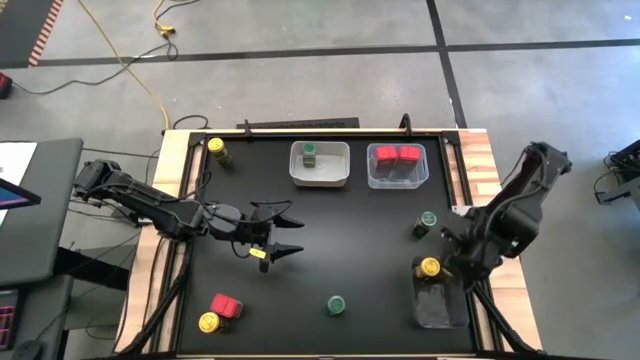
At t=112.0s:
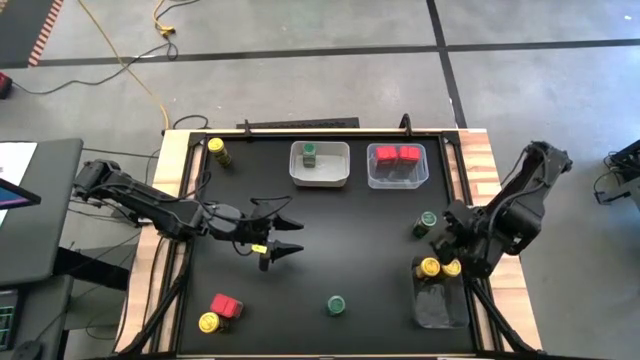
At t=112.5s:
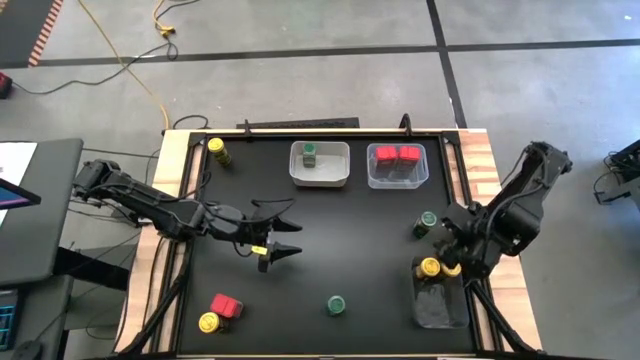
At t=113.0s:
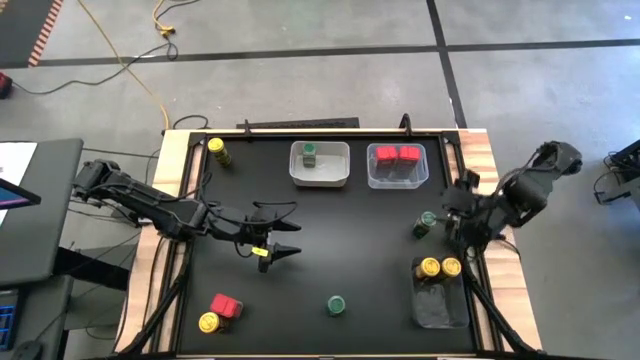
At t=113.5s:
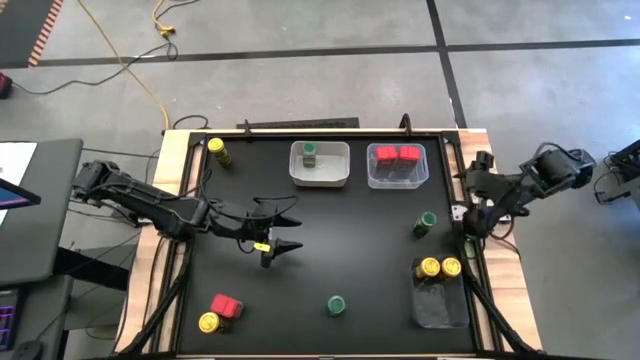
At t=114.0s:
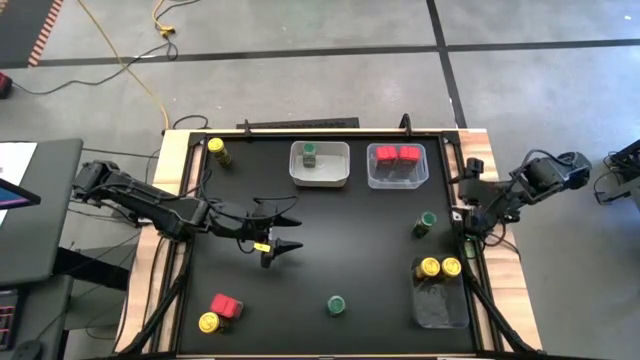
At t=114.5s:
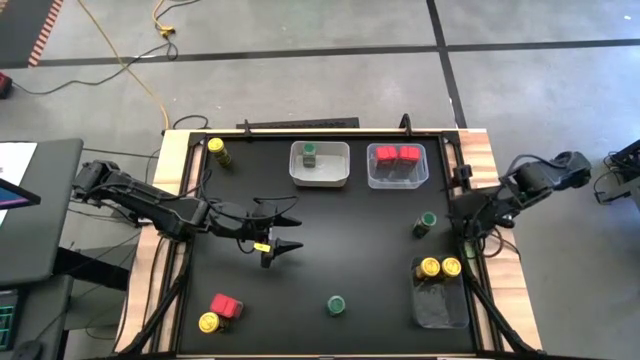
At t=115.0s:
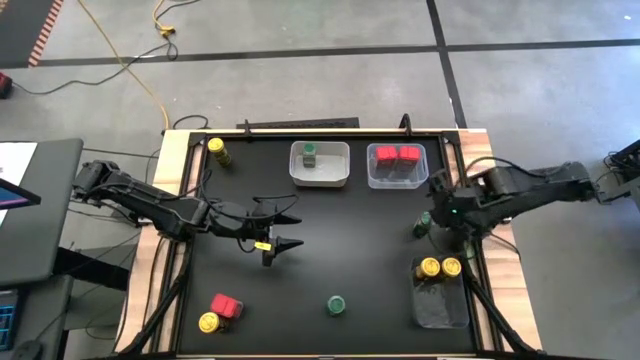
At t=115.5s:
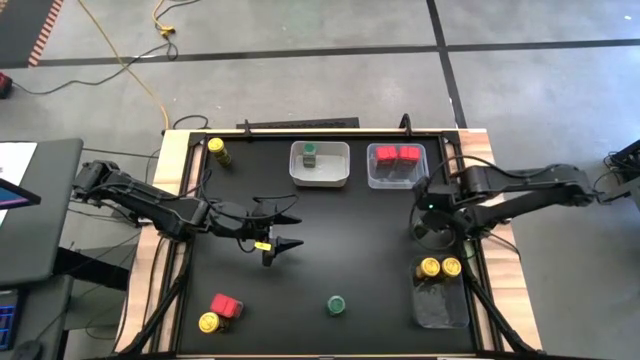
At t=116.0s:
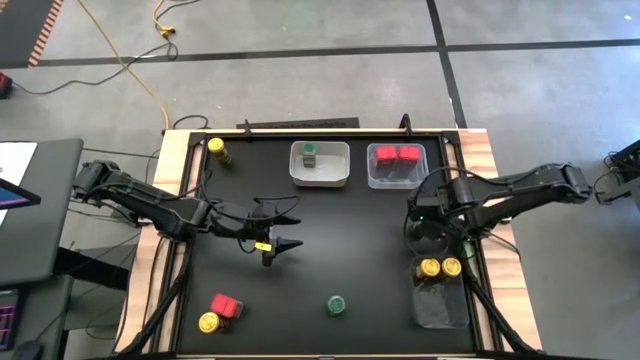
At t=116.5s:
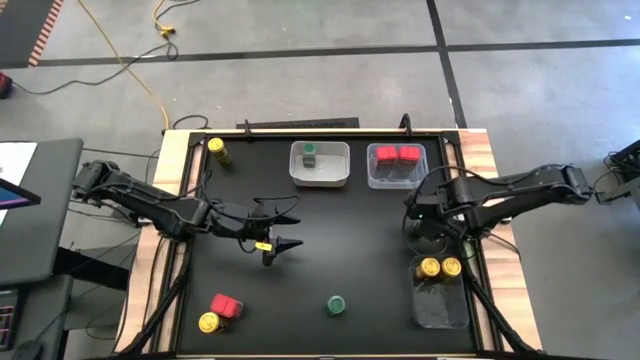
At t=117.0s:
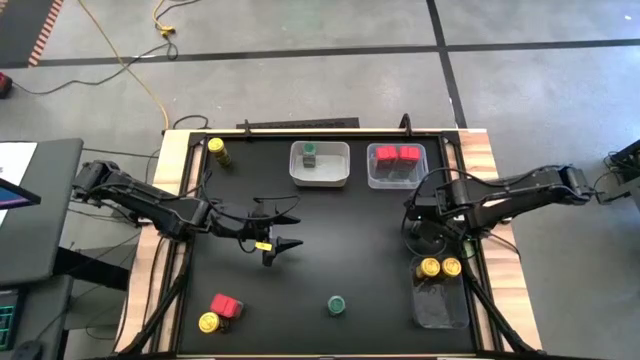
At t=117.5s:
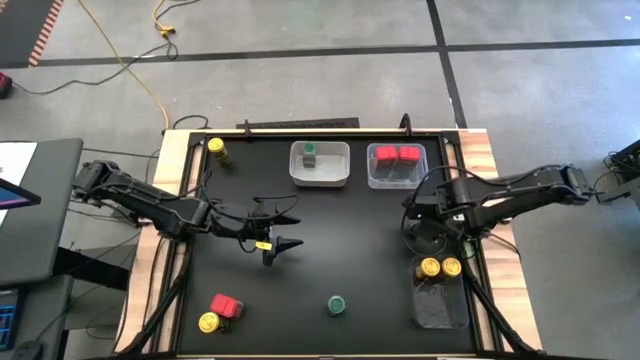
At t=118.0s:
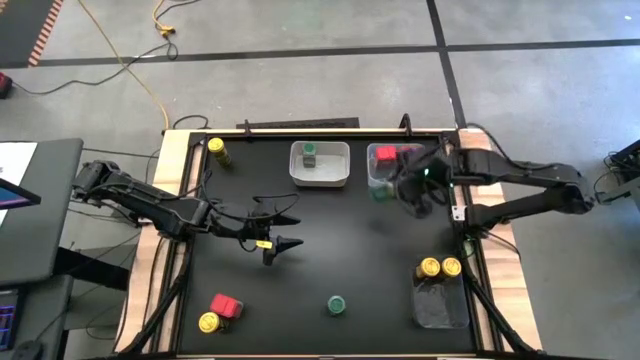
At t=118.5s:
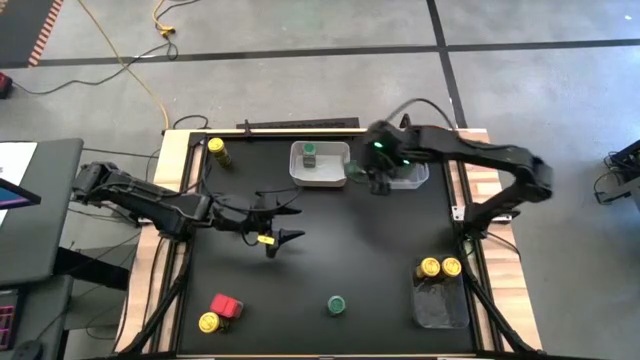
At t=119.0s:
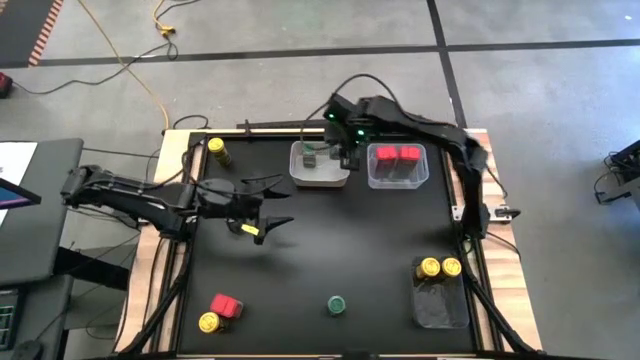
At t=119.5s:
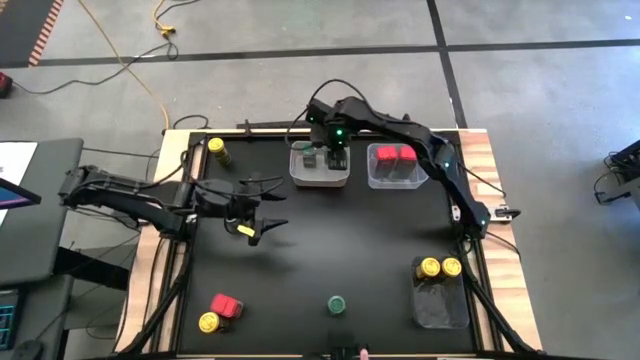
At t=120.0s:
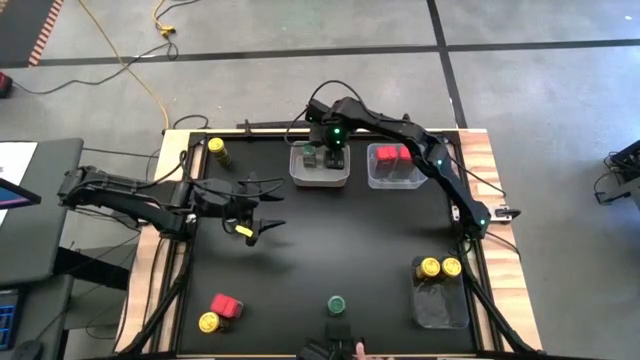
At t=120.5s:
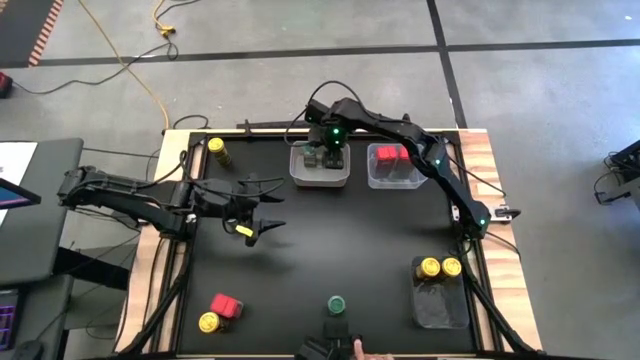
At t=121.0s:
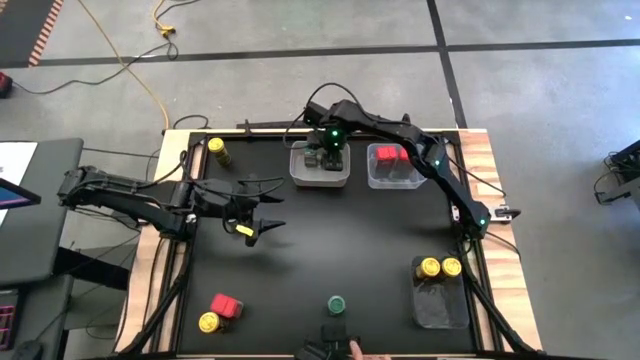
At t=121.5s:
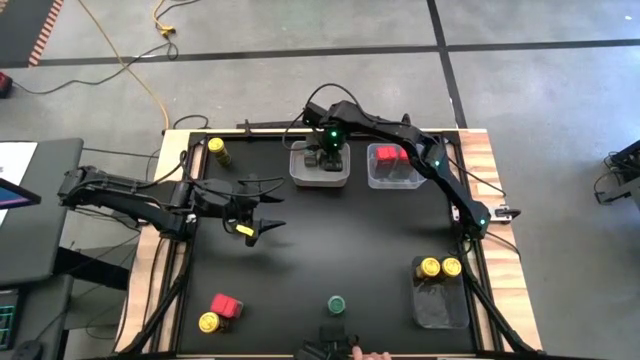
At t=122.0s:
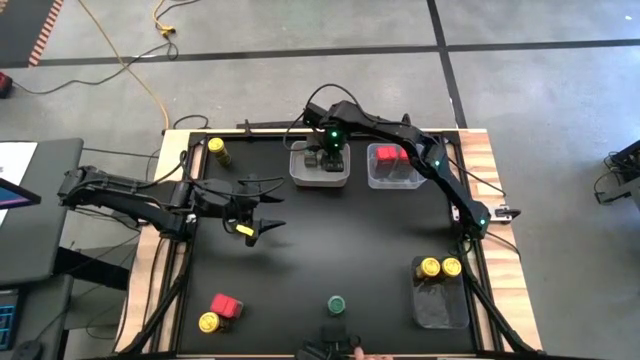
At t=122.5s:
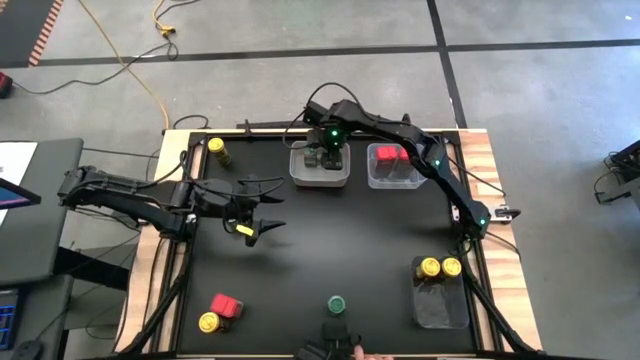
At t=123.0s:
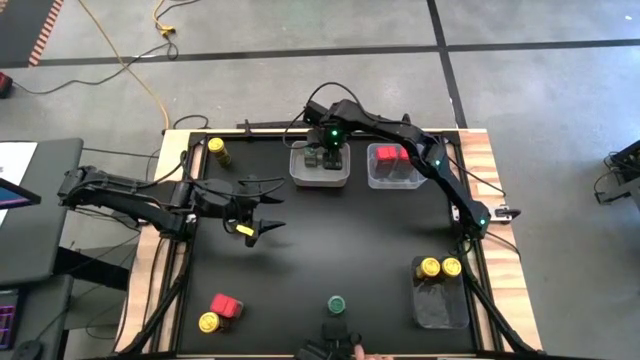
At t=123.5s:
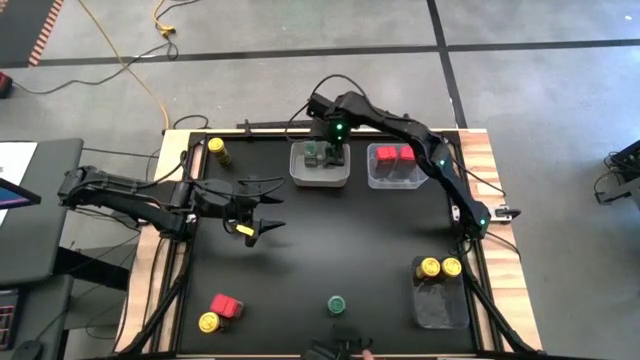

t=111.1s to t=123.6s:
Task: Sort spices by type
Put the right green seasoning bottle into the white bin

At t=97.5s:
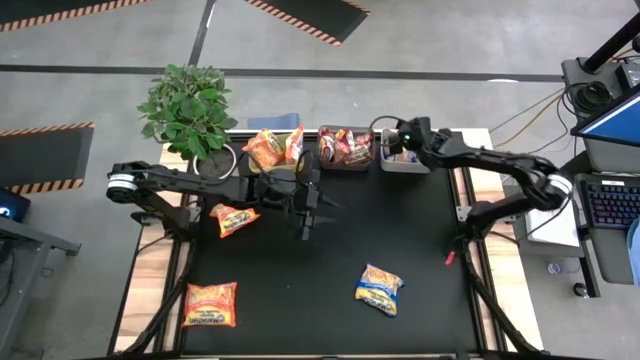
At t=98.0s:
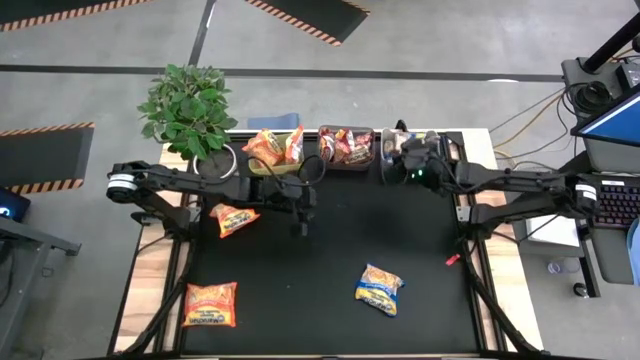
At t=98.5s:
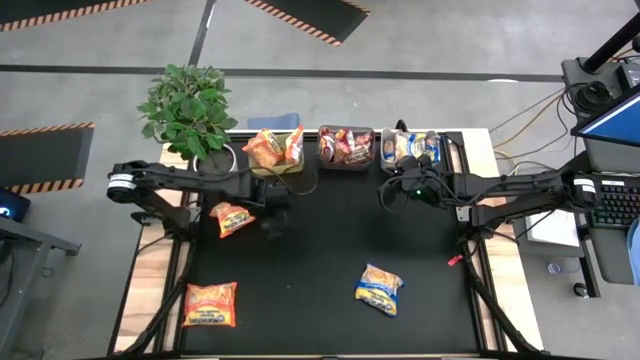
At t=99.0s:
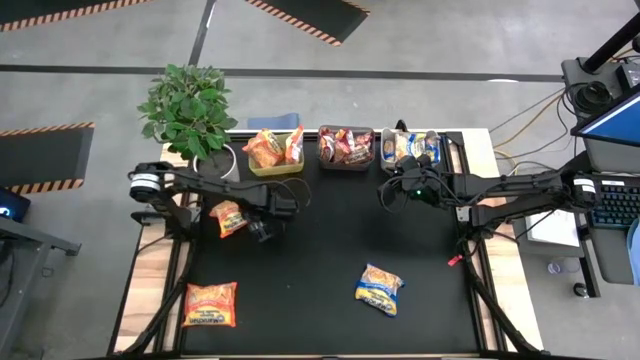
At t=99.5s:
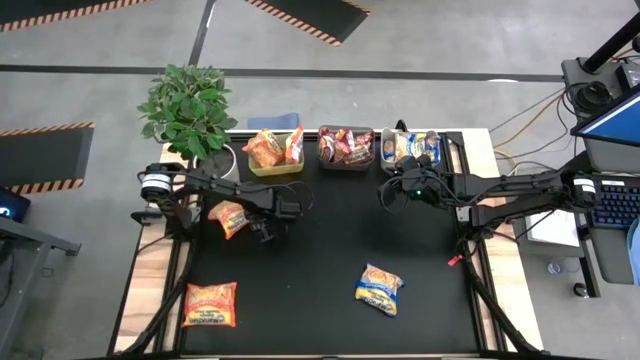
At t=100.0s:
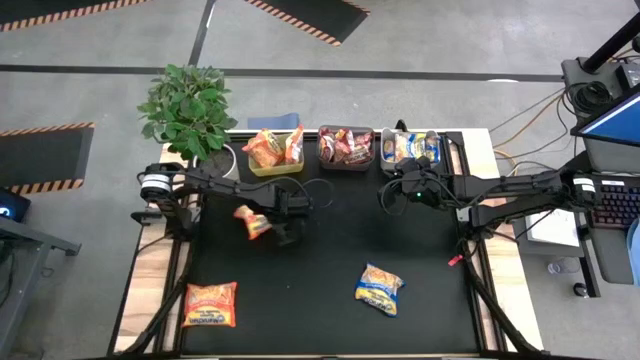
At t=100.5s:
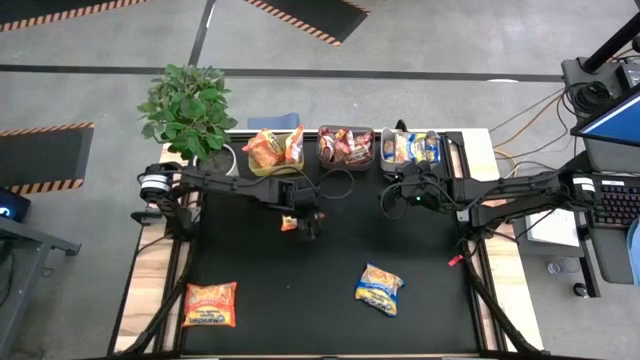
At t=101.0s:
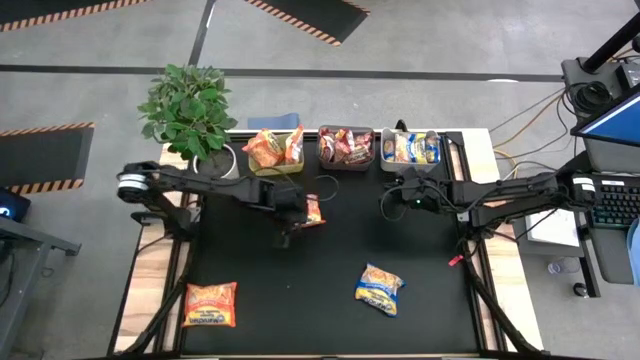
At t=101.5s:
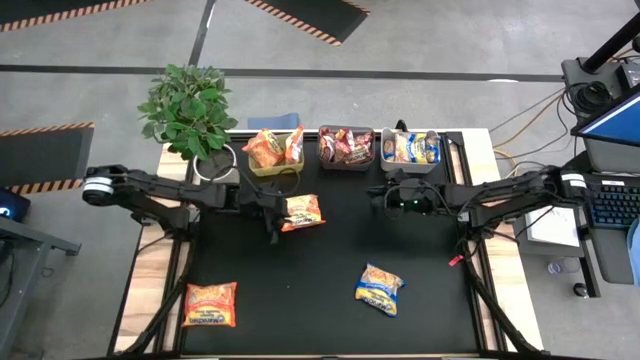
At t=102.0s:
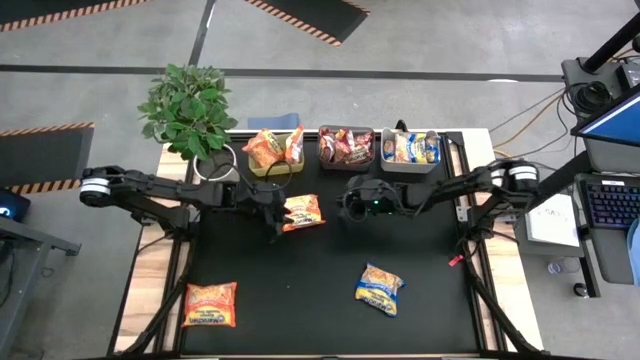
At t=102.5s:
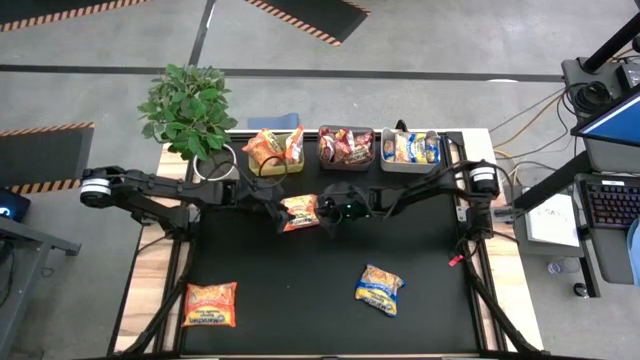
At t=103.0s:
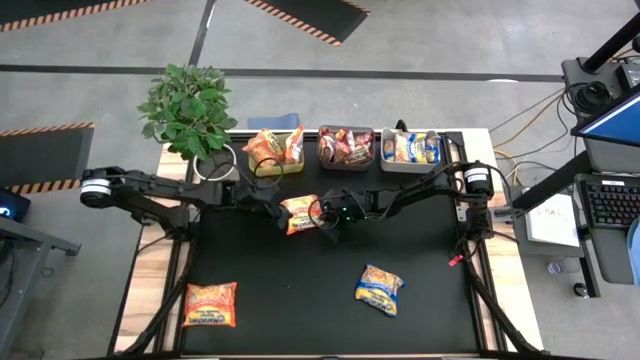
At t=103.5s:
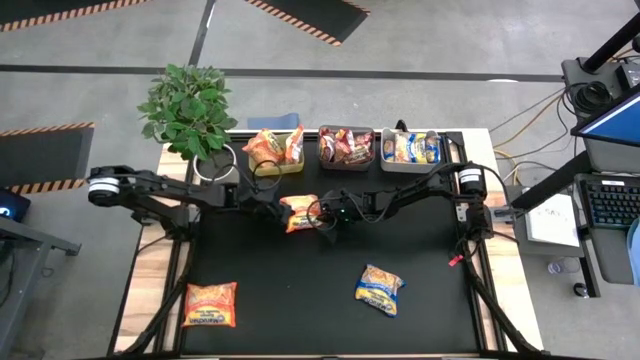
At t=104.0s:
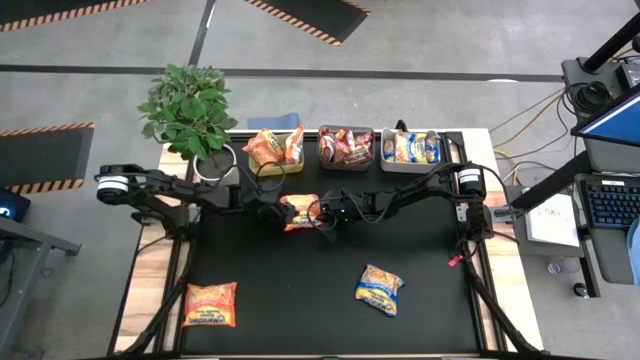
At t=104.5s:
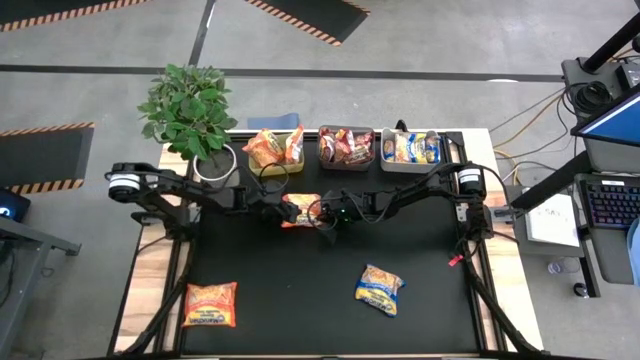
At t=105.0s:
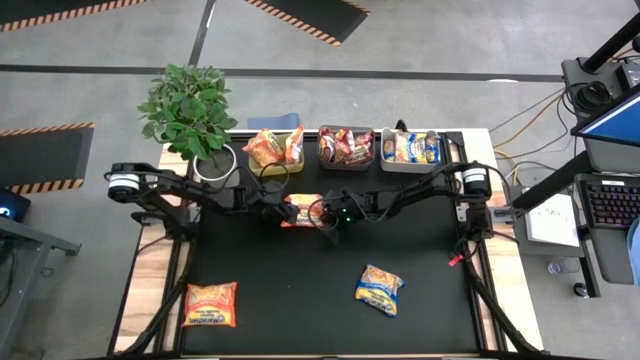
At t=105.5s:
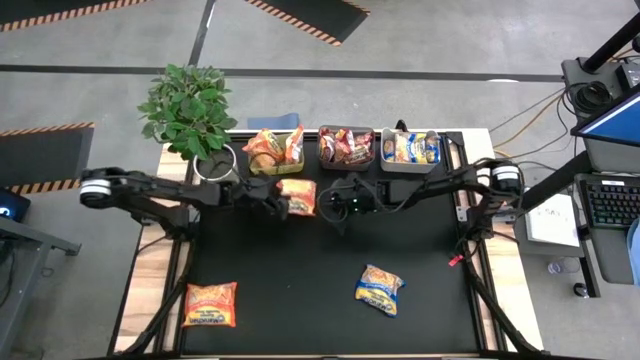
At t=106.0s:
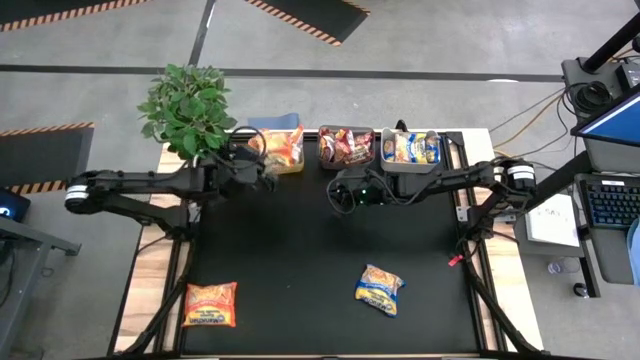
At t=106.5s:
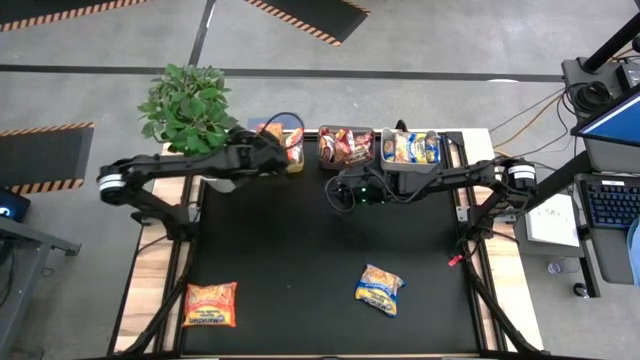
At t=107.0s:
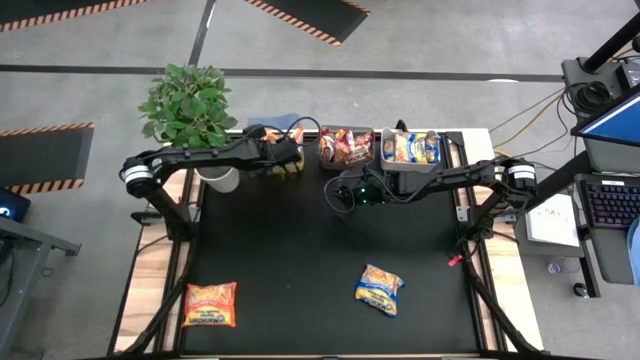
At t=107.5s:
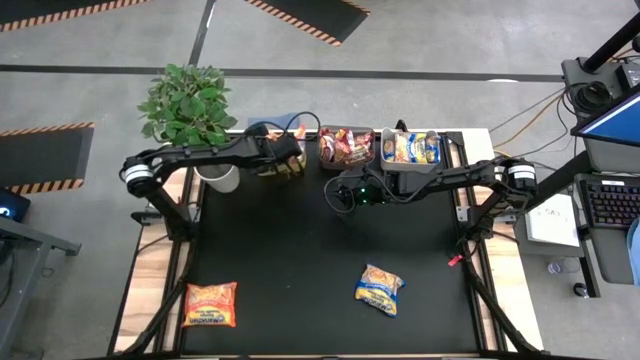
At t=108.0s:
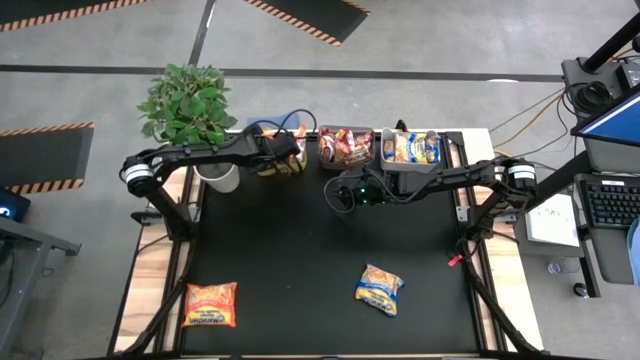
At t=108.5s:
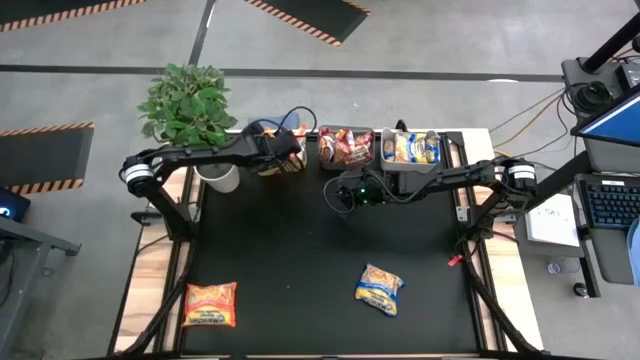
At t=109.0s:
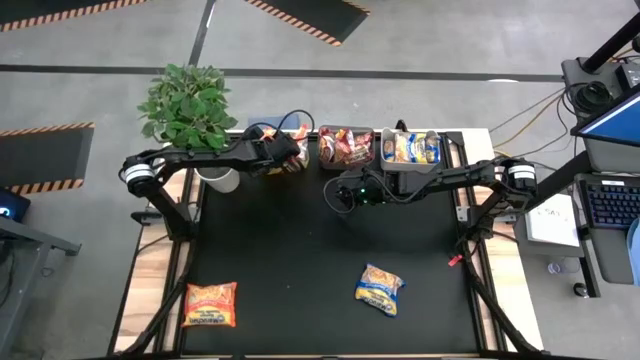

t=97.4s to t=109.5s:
Task: Sort Maruchan noodles
Put the top orange noodle pack into the yellow bin
